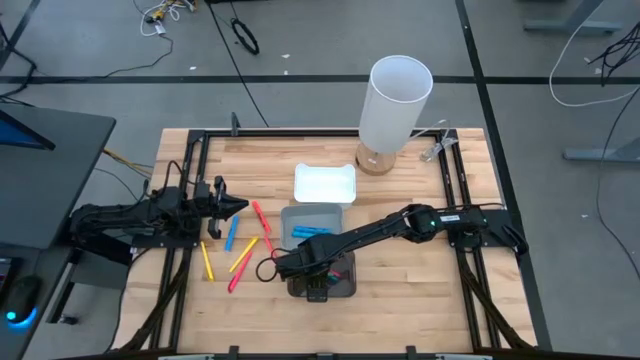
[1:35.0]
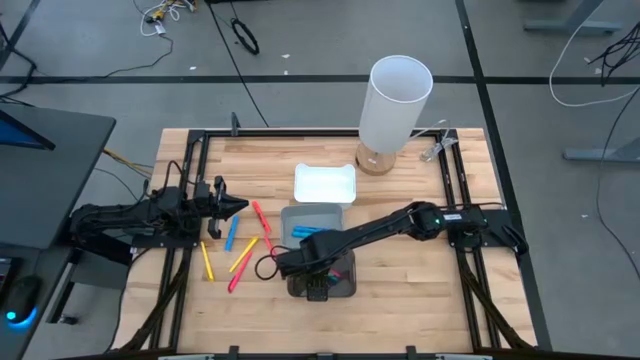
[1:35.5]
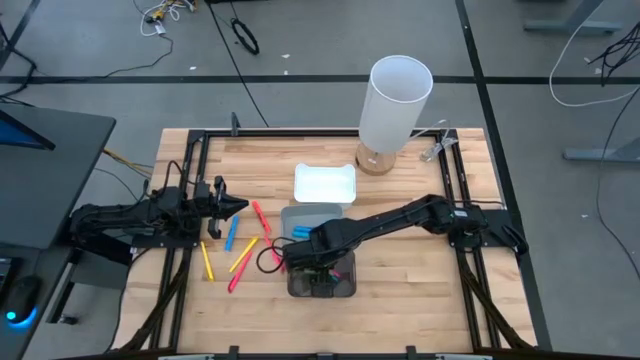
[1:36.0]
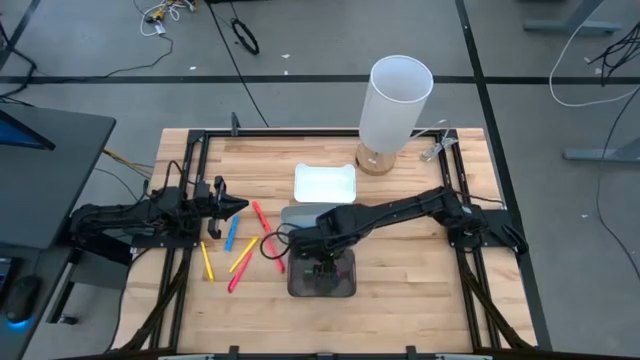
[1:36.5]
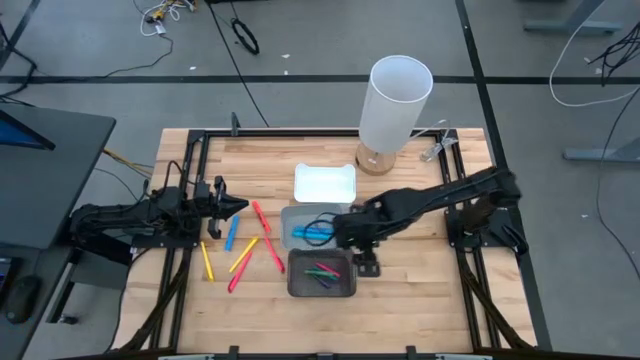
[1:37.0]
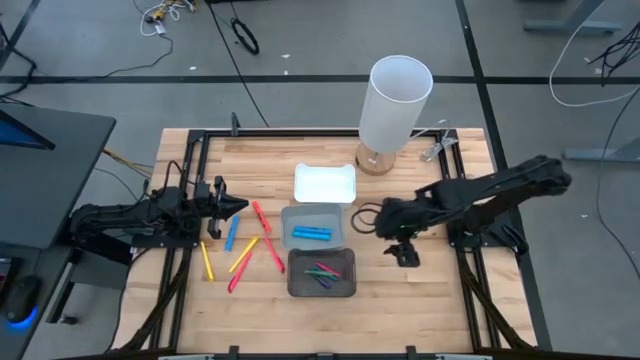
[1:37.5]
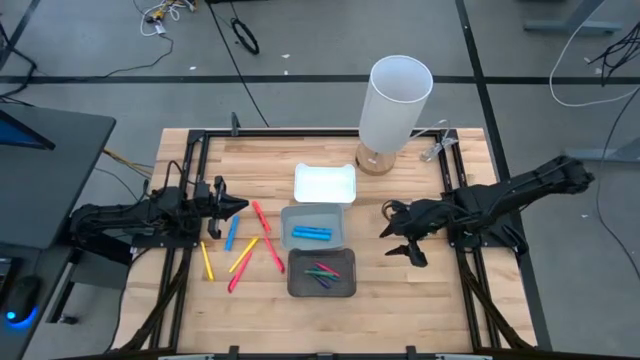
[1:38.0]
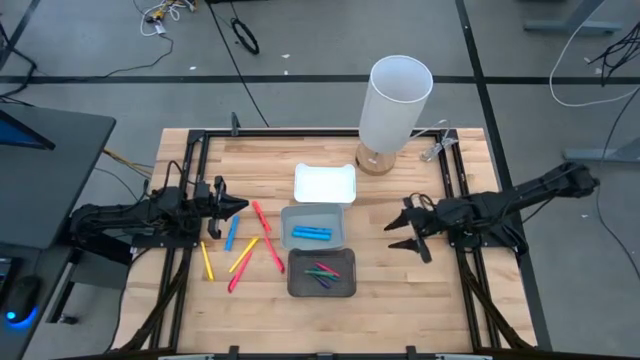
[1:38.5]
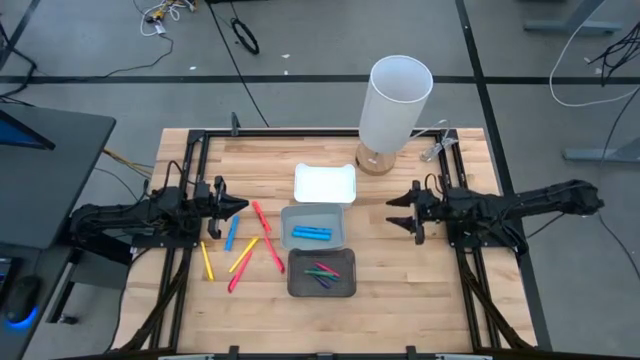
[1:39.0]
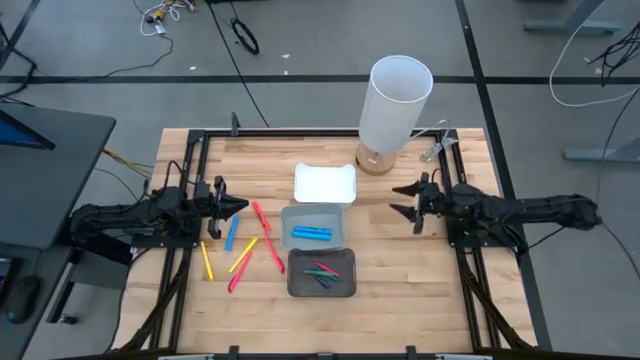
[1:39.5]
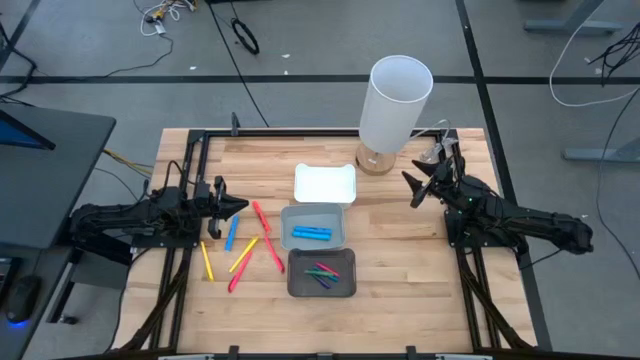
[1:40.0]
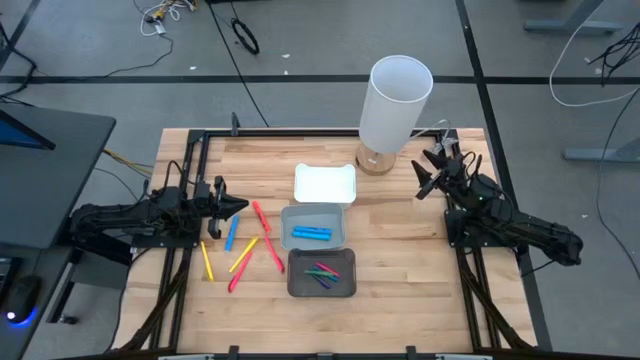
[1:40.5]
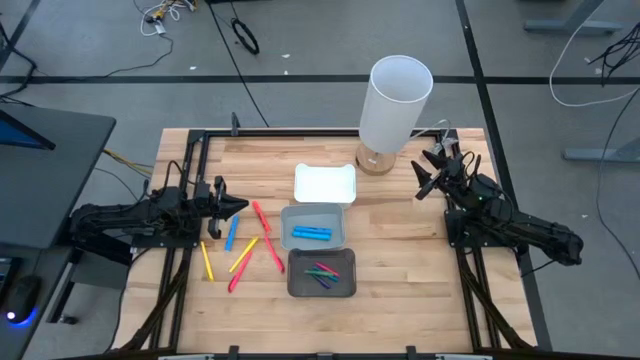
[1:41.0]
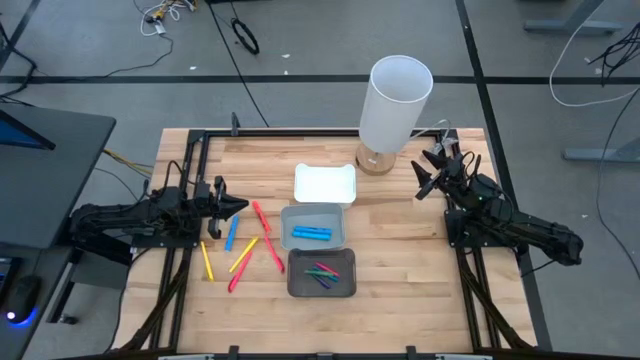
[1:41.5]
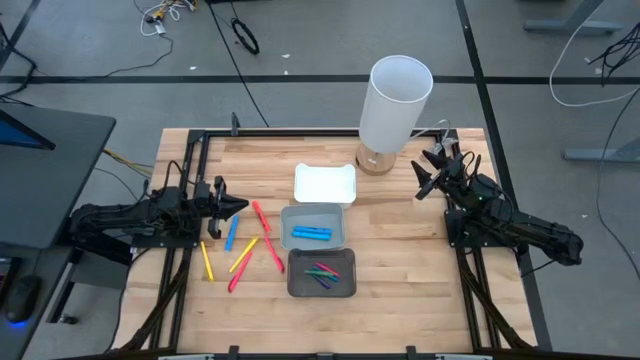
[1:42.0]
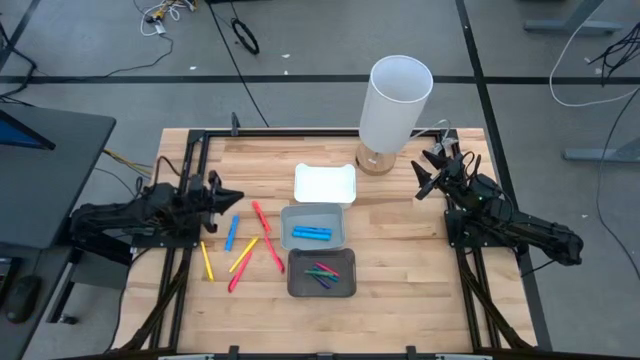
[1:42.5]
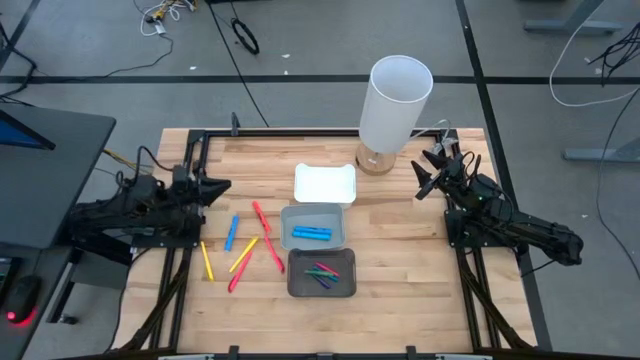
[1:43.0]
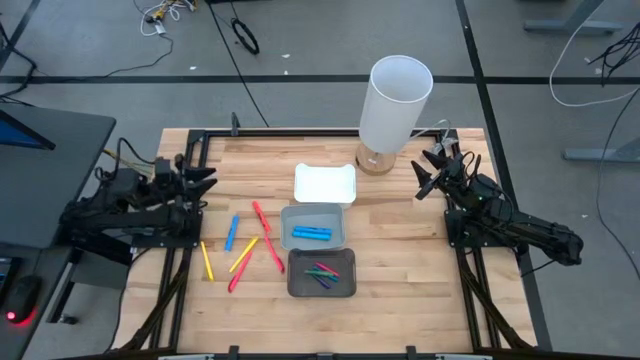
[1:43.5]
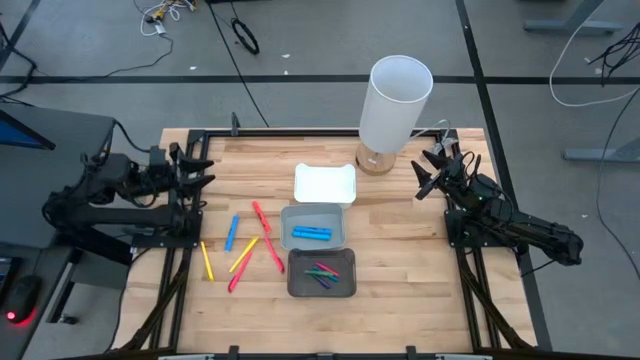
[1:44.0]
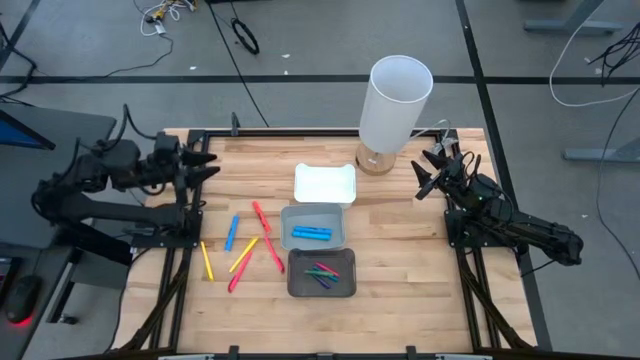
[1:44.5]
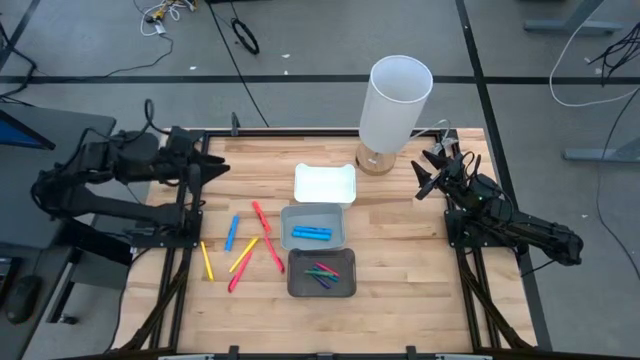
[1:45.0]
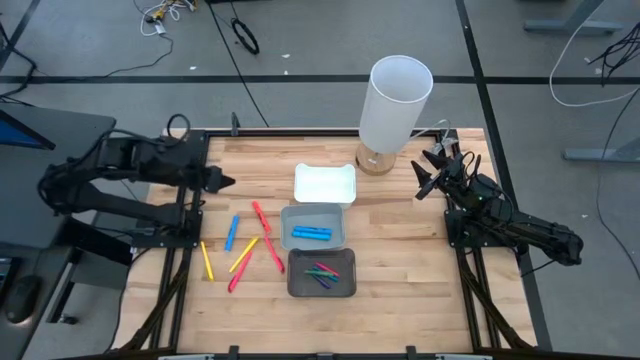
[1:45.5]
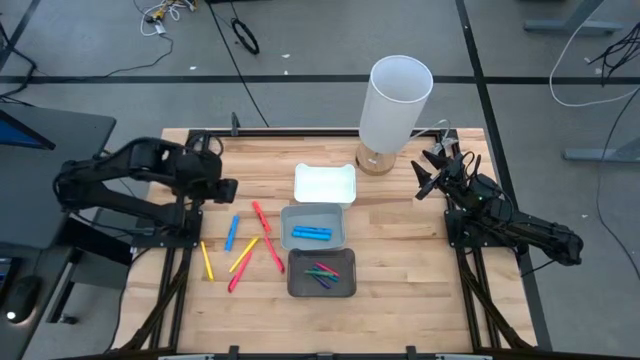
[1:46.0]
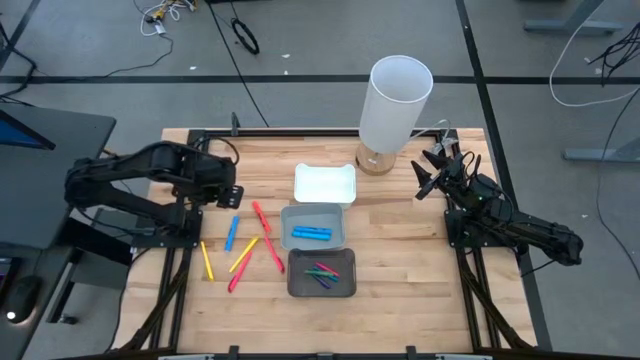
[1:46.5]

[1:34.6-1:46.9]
Task: Pick & Place Markers
Put the blue highlighter pen into the gray bin

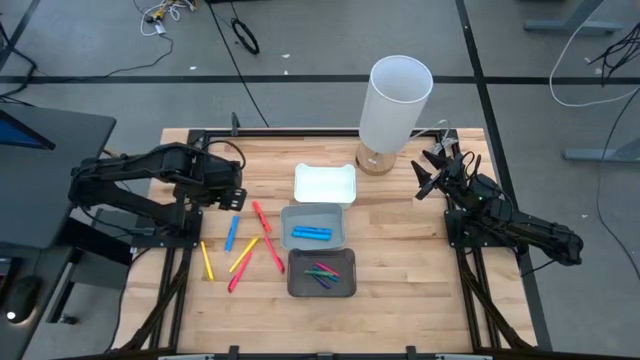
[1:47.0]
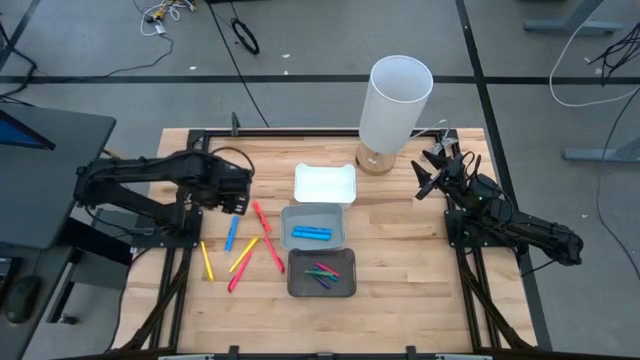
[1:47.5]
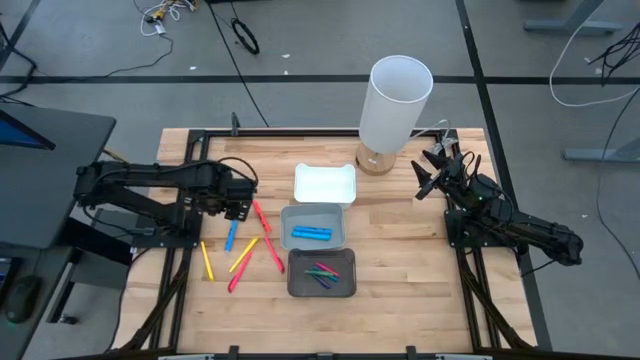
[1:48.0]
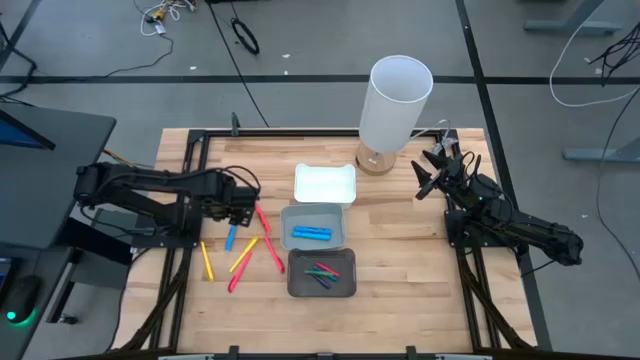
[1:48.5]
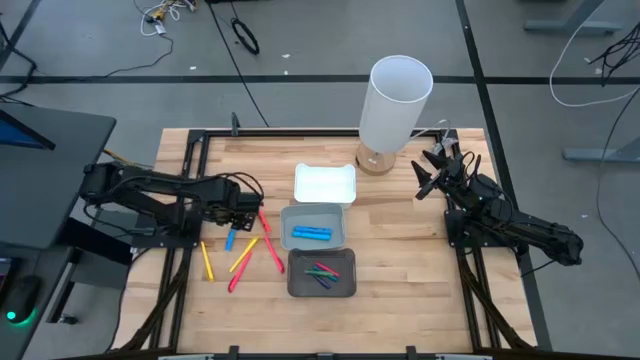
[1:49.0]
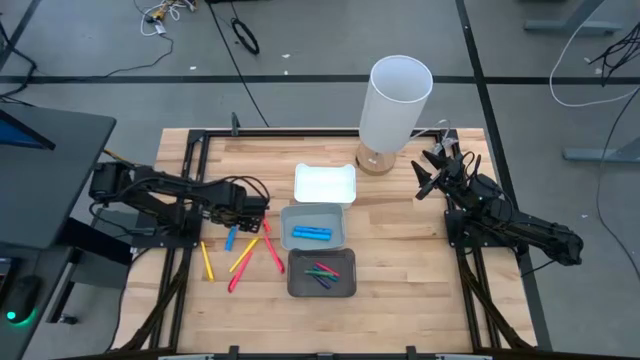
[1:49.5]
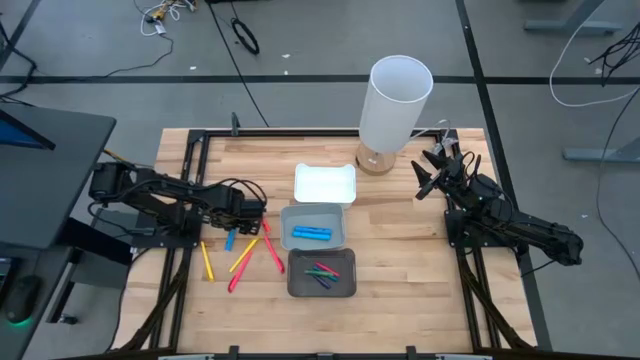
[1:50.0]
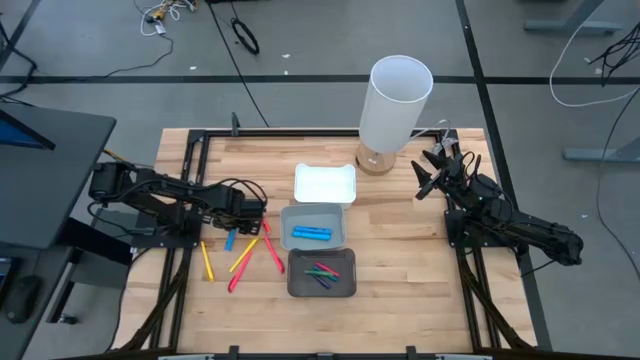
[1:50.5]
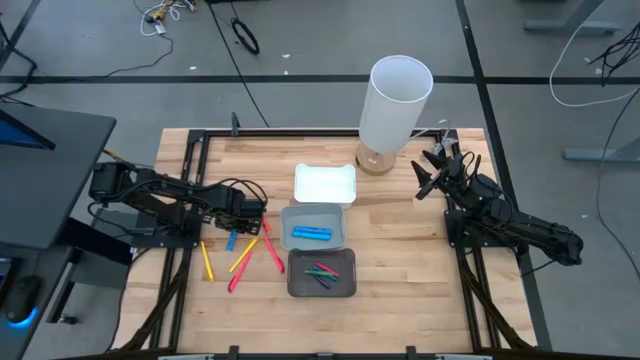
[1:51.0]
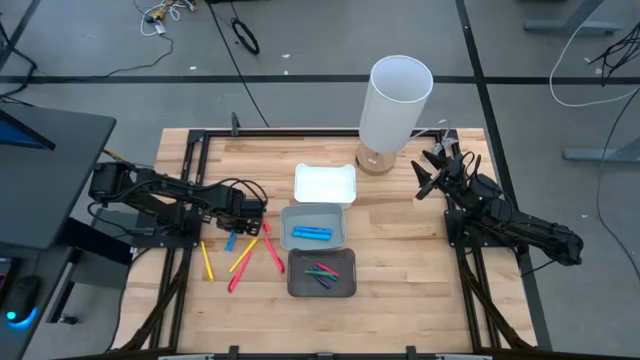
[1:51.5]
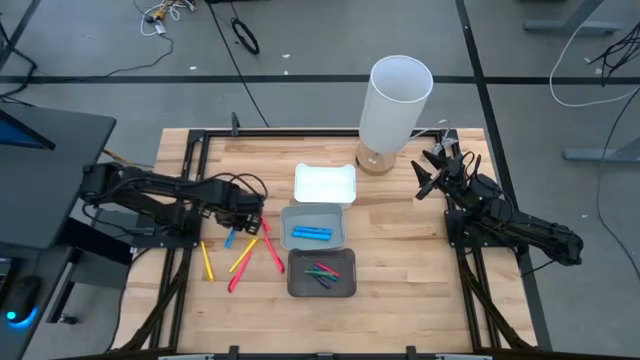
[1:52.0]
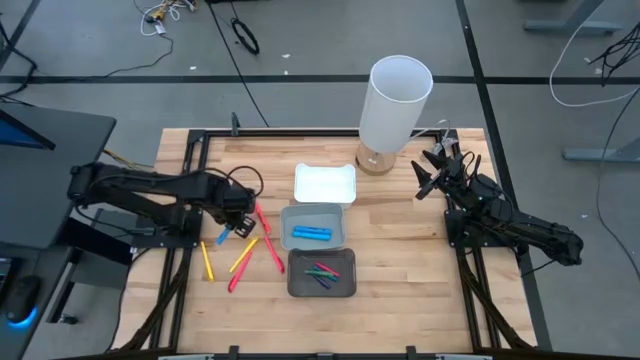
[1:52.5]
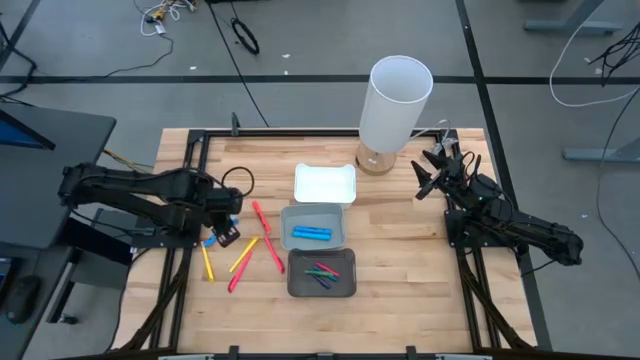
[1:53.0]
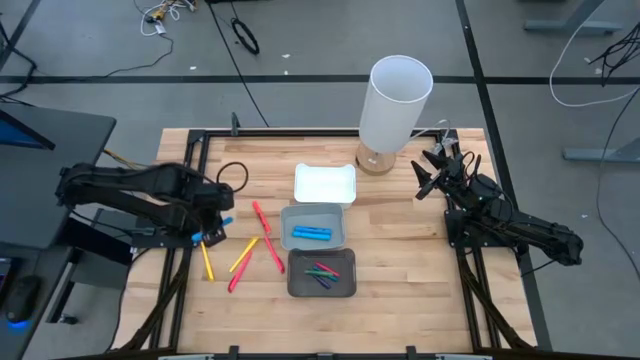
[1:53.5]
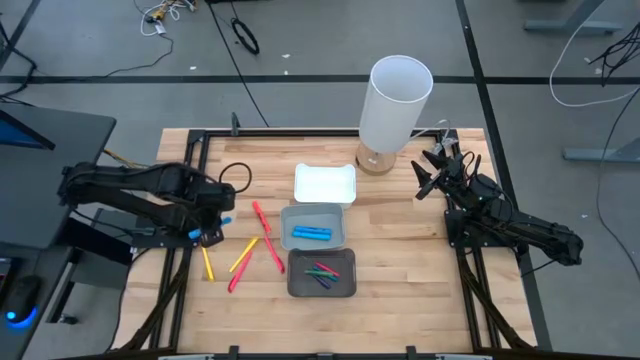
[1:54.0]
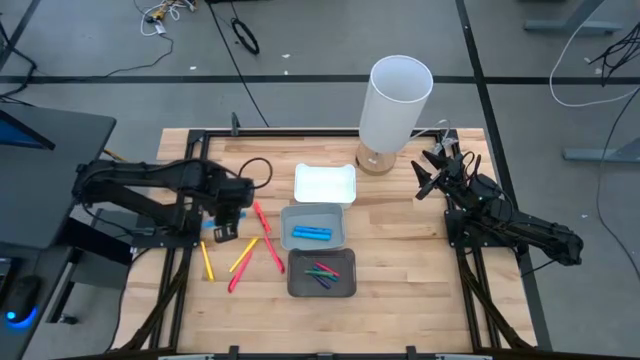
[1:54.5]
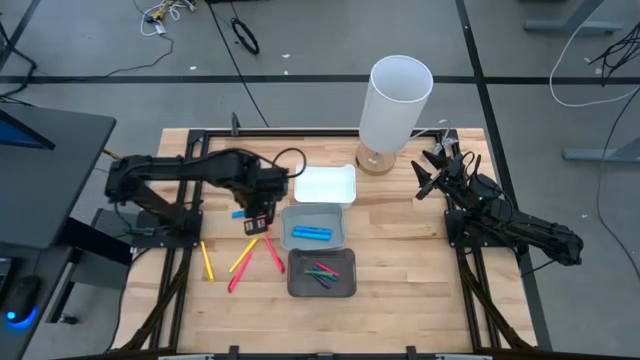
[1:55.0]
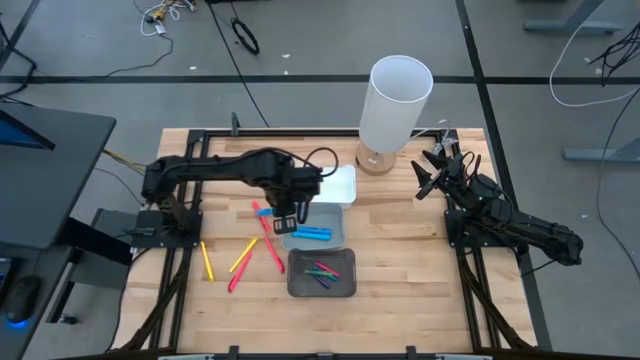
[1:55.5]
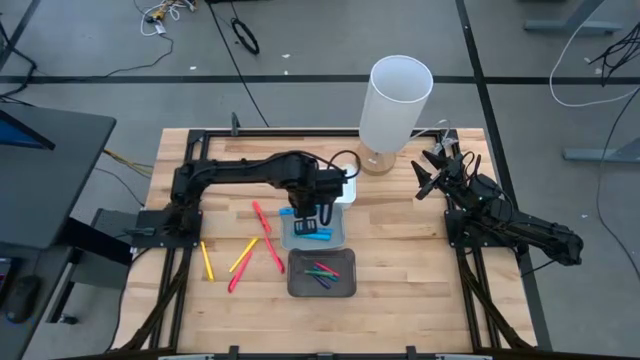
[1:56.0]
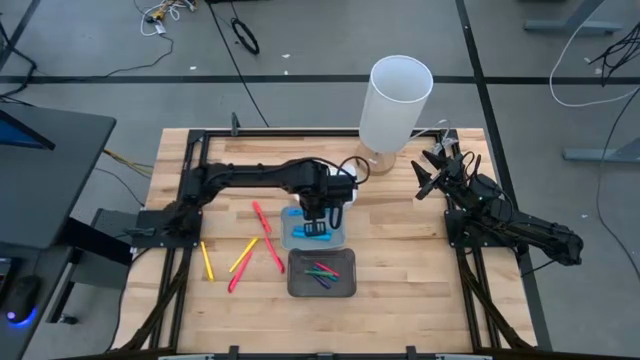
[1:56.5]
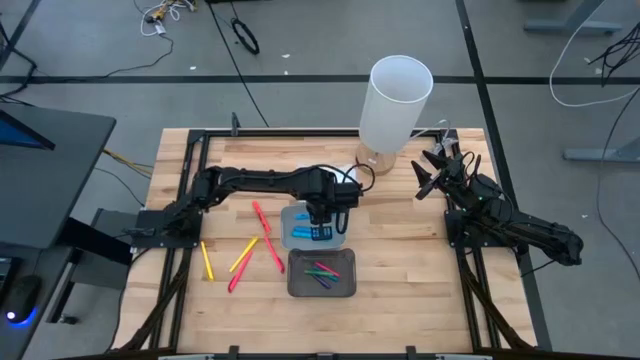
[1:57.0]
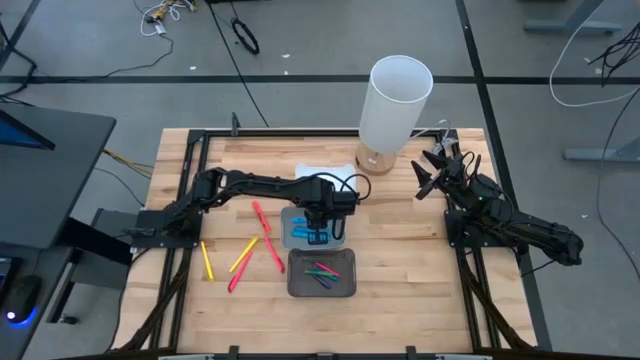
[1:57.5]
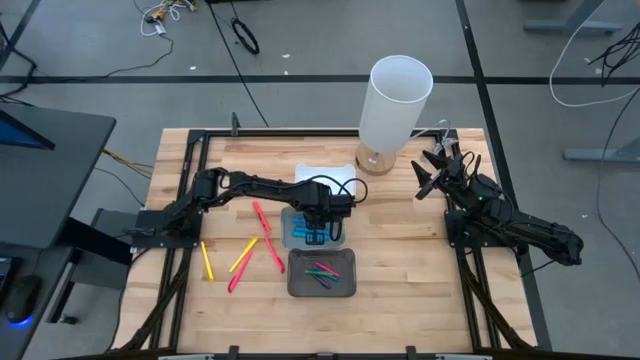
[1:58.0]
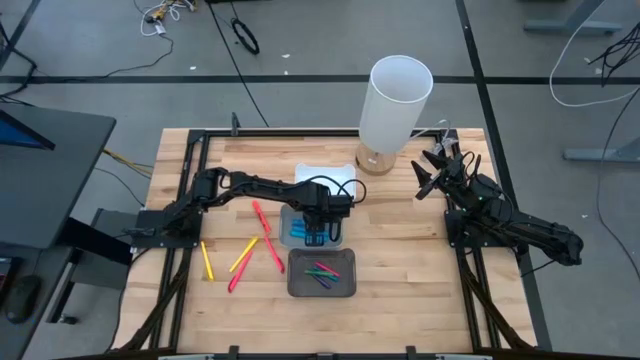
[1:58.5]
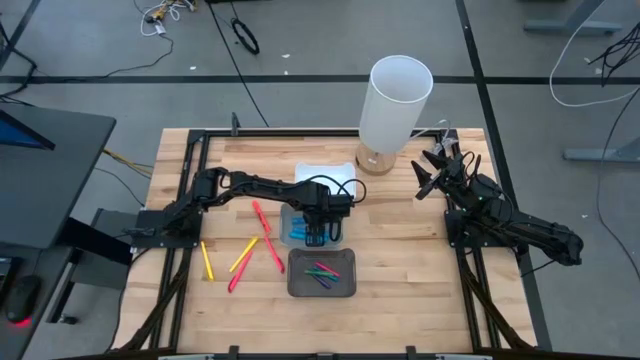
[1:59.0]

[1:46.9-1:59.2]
Put the blue highlighter pen into the gray bin
